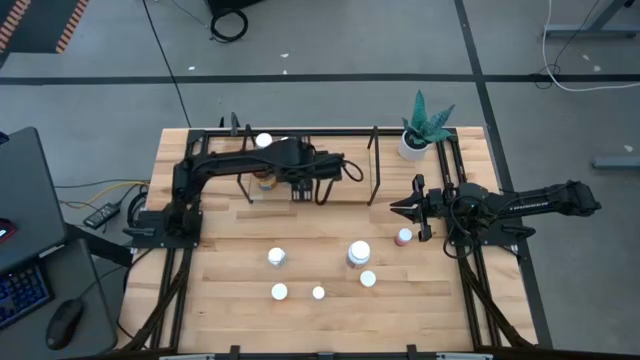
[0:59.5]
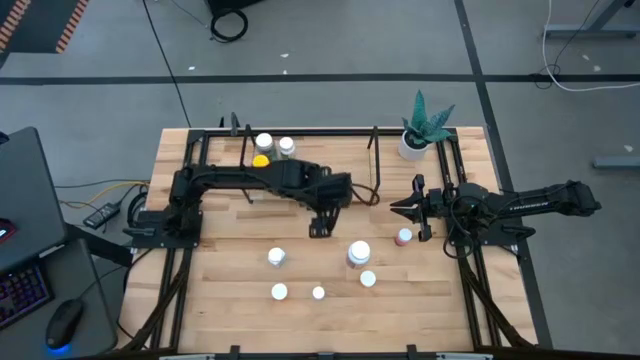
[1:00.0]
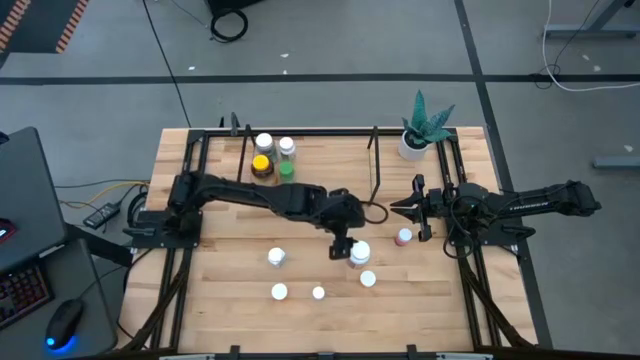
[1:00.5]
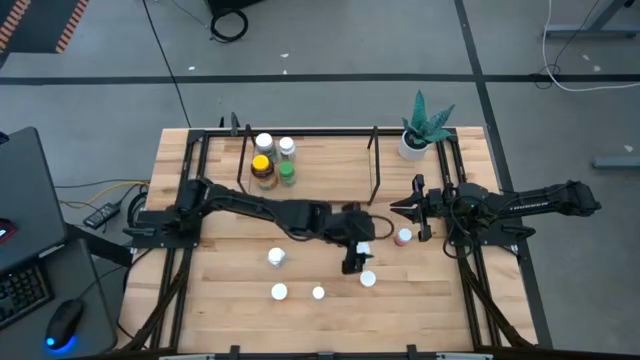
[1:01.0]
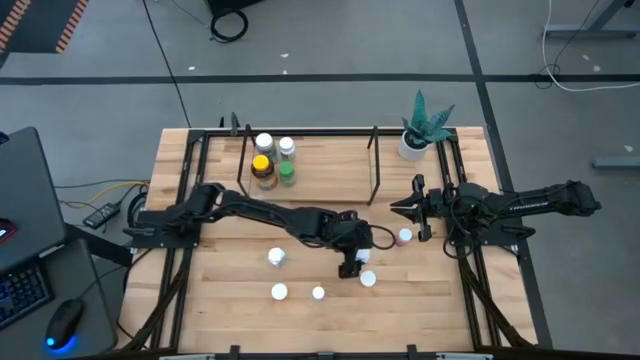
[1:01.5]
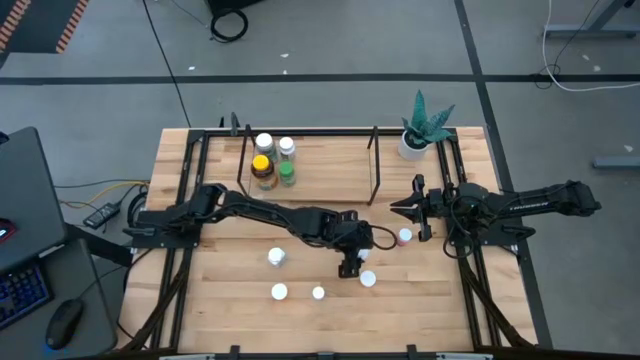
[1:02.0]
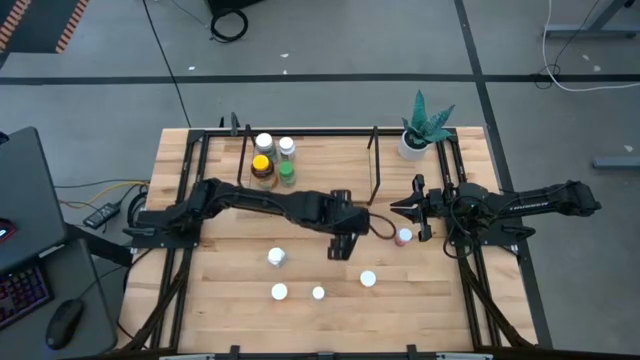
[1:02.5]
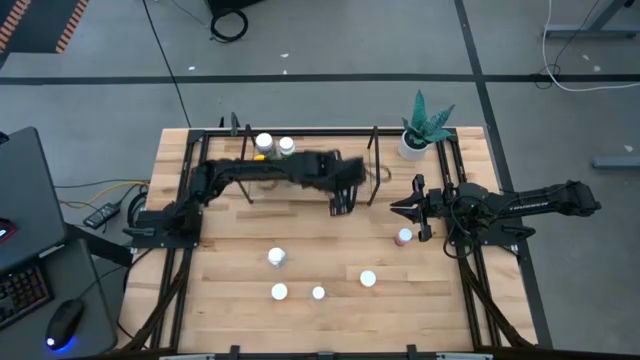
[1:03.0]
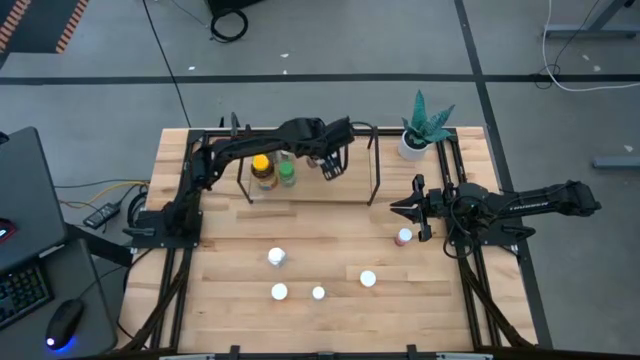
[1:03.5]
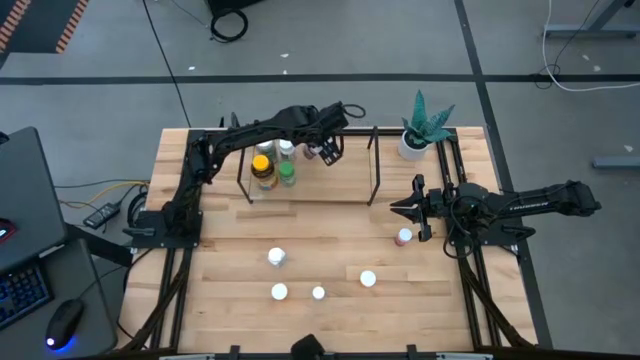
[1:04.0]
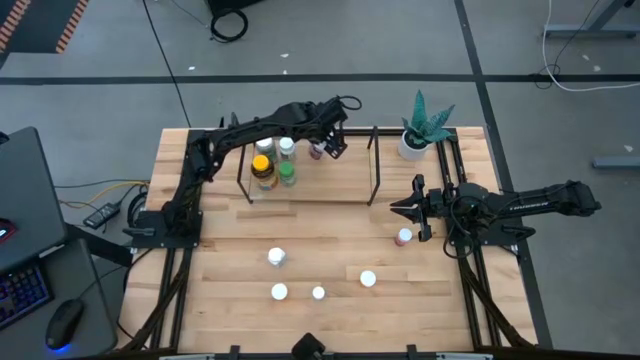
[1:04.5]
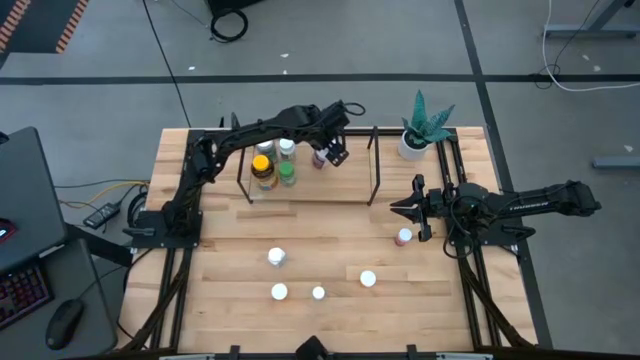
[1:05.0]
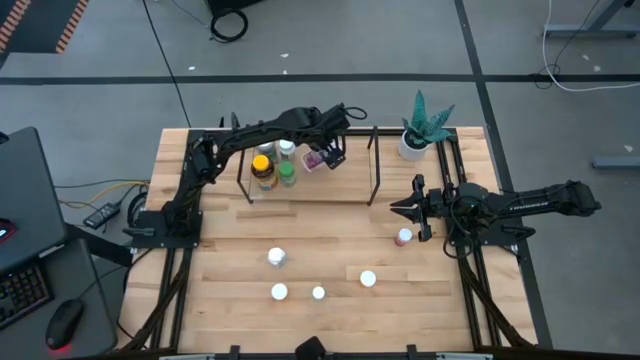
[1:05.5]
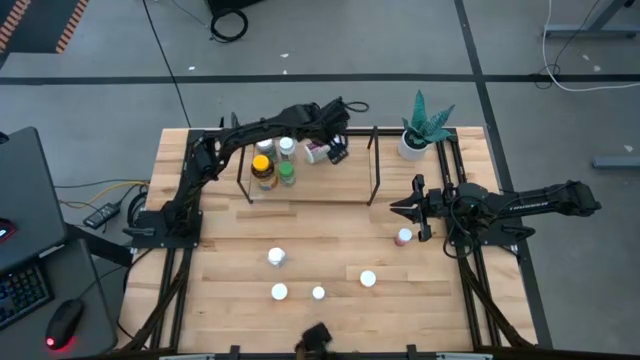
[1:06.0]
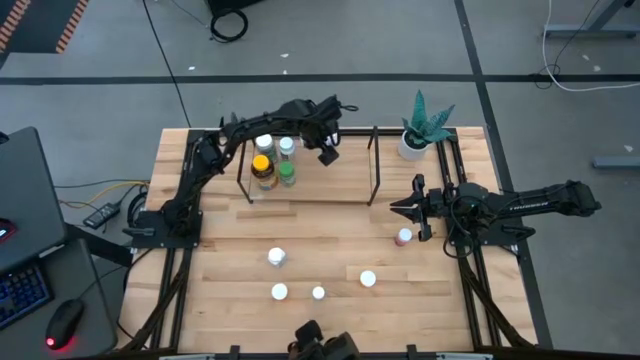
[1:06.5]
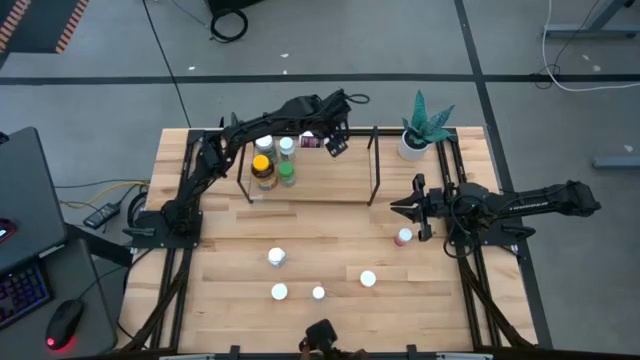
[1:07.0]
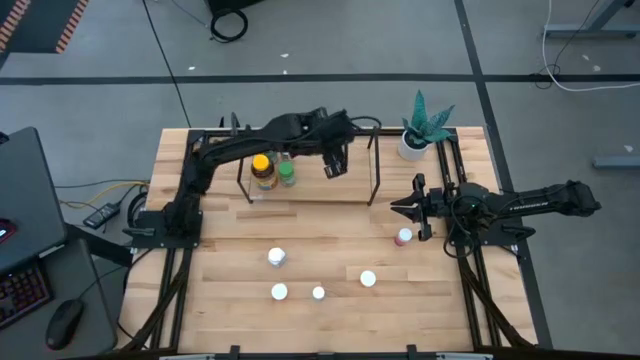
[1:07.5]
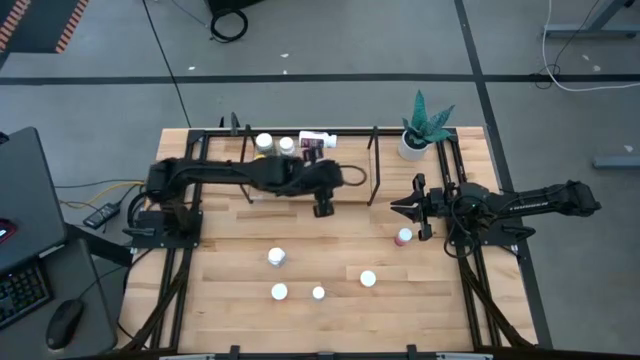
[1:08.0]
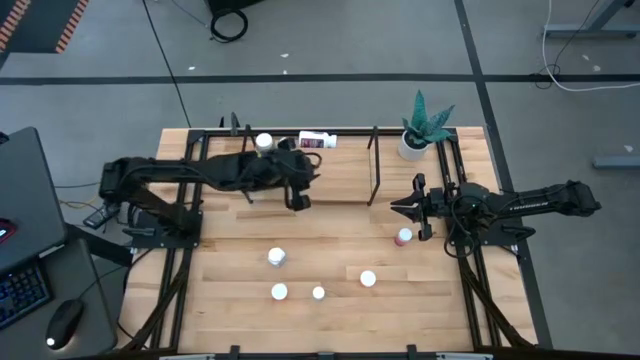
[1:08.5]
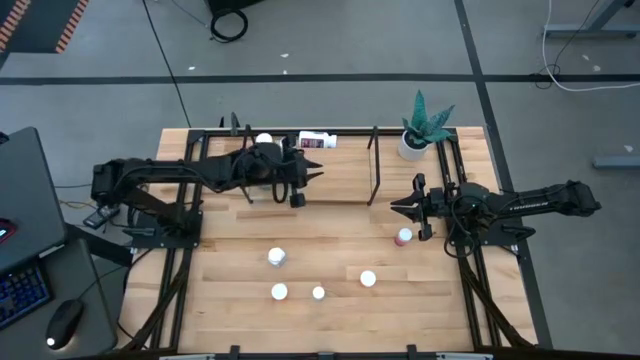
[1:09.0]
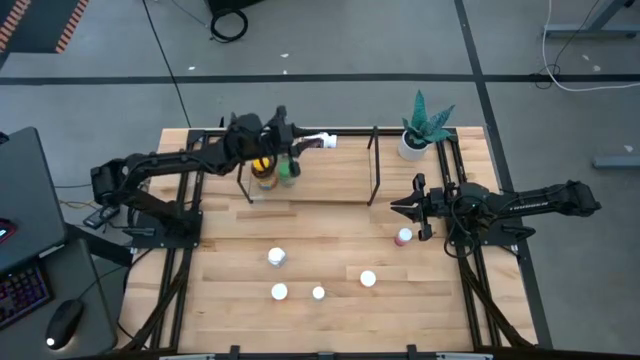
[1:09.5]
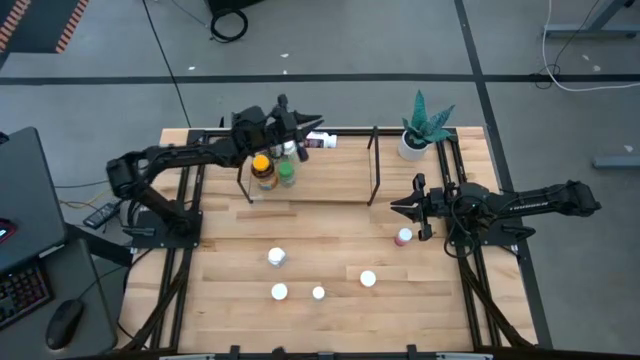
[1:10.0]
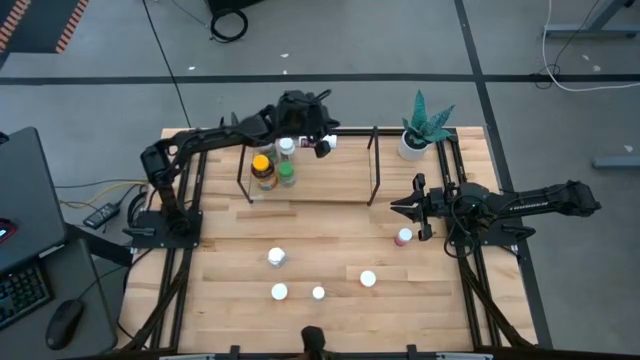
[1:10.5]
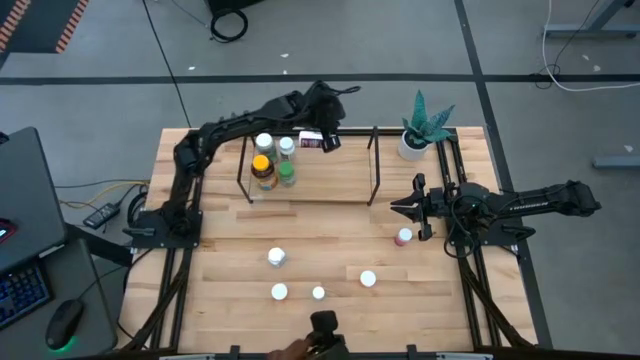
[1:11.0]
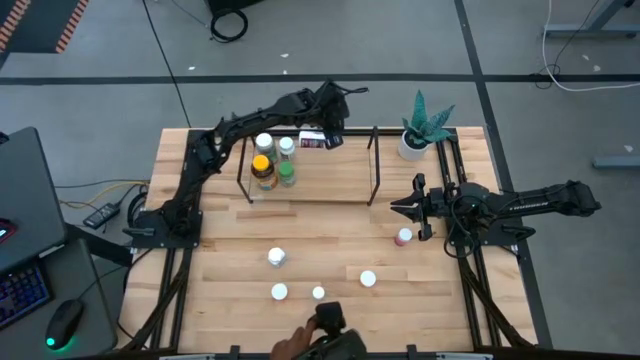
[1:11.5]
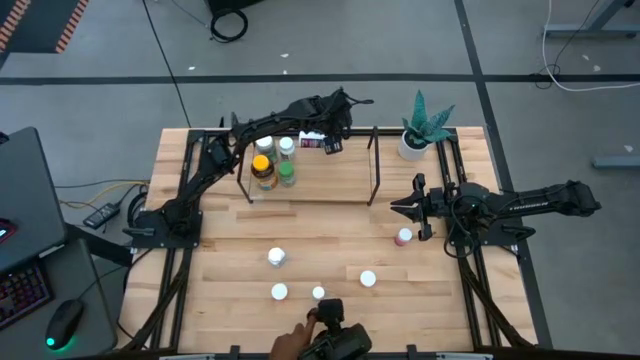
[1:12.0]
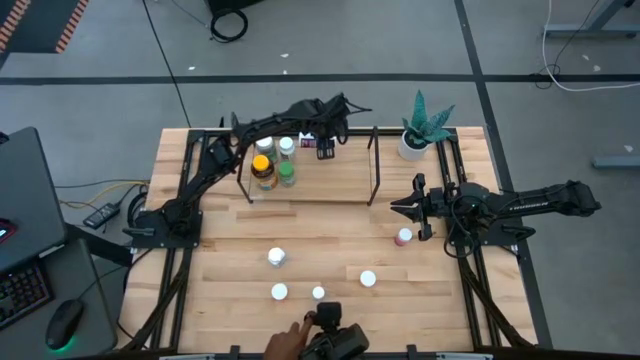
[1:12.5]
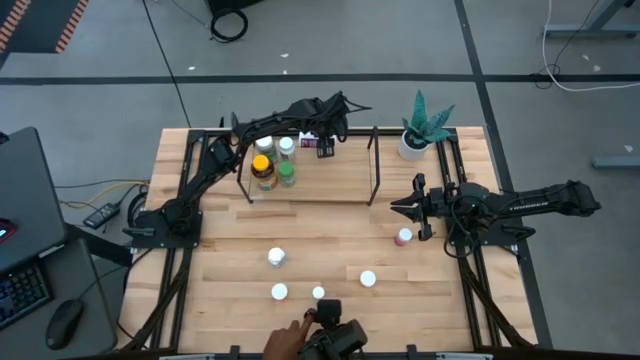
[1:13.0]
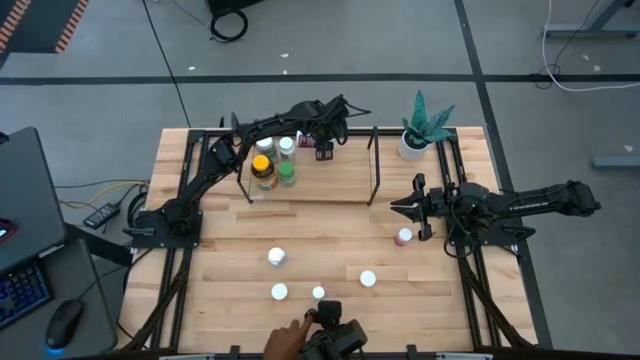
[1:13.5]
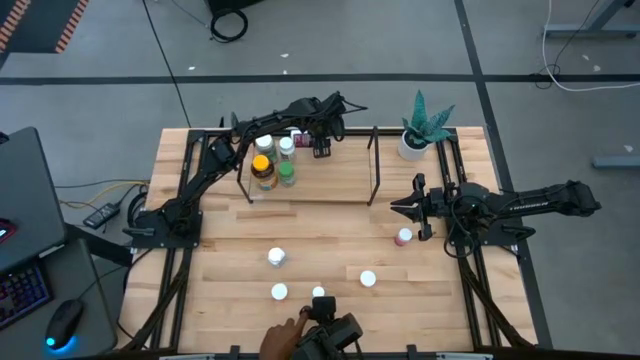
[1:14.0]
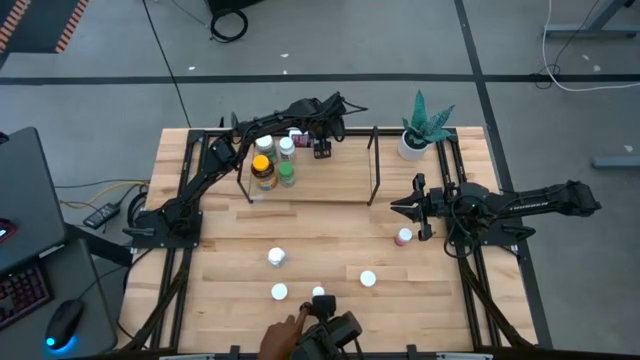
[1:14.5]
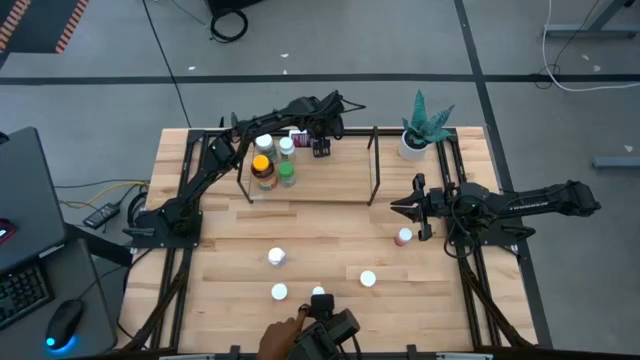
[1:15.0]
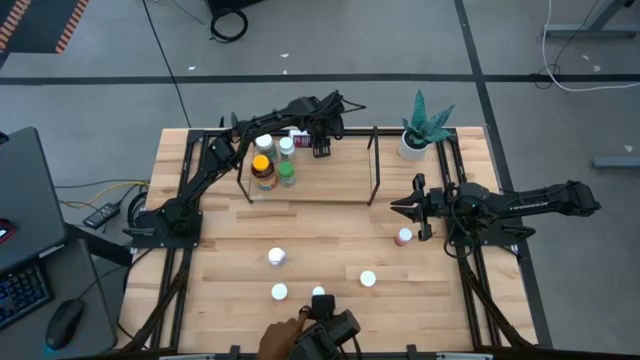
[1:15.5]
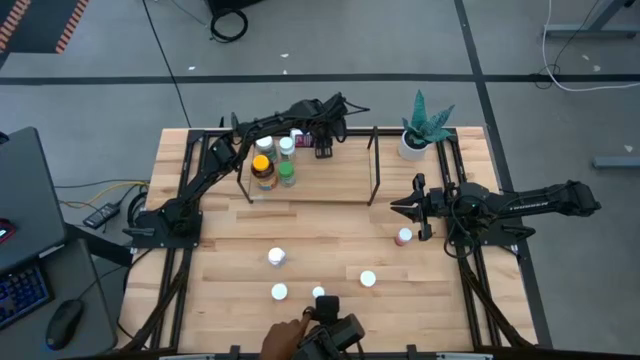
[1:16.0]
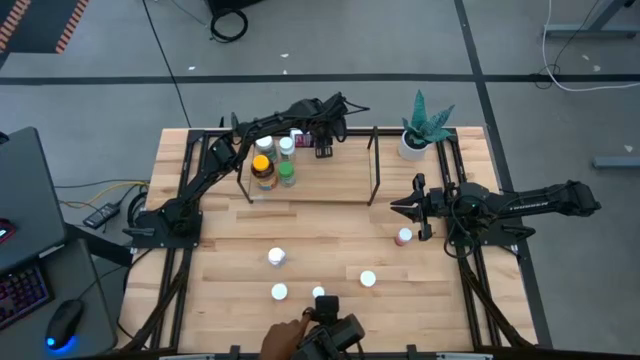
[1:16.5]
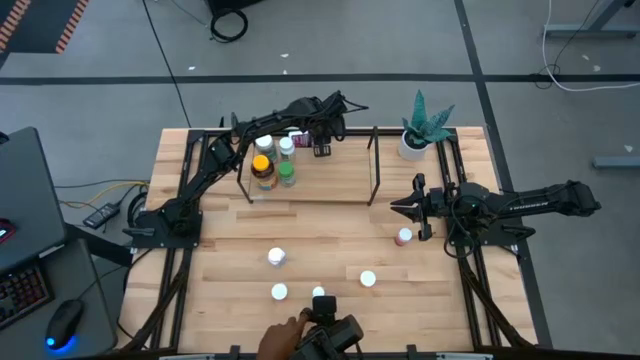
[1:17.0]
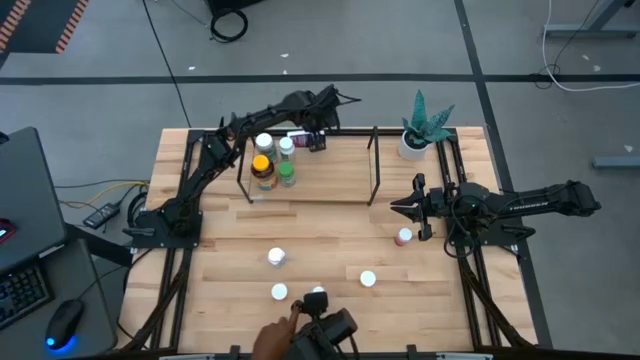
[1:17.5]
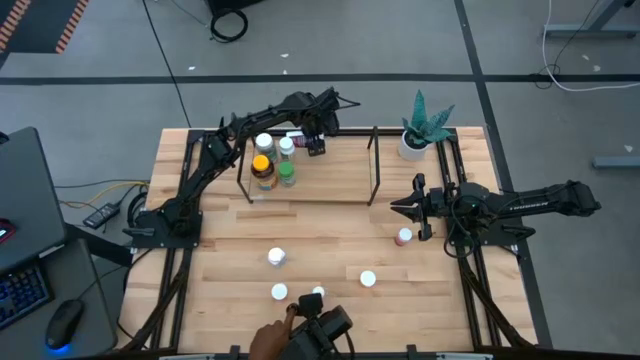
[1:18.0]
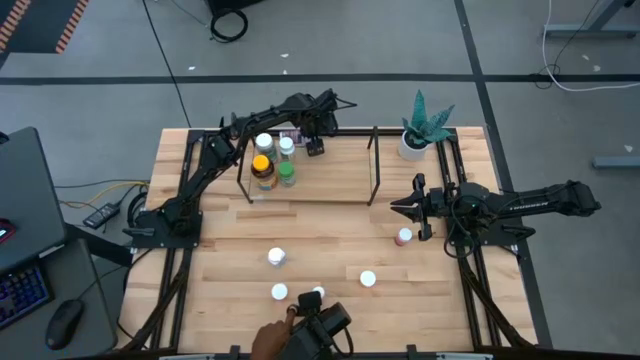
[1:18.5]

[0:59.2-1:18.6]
Task: Pick and place medicine bottles onto shelf by color
Put the red pill bottle on the shelf
